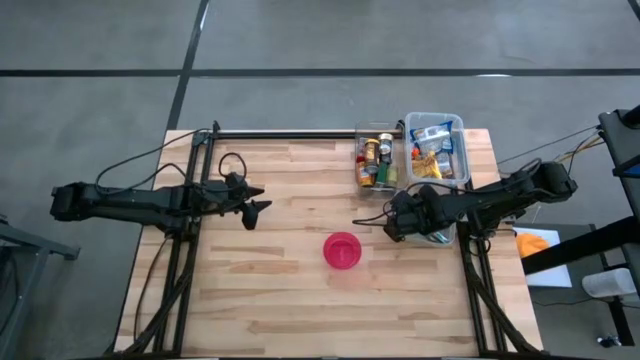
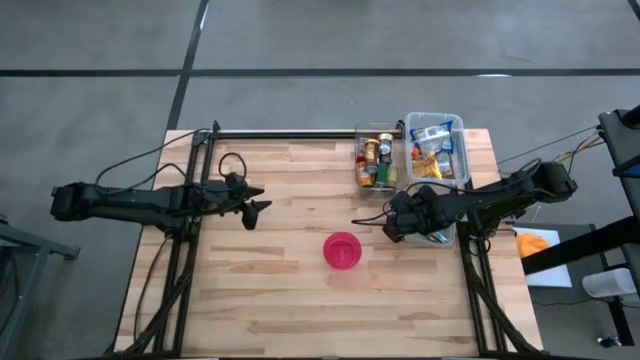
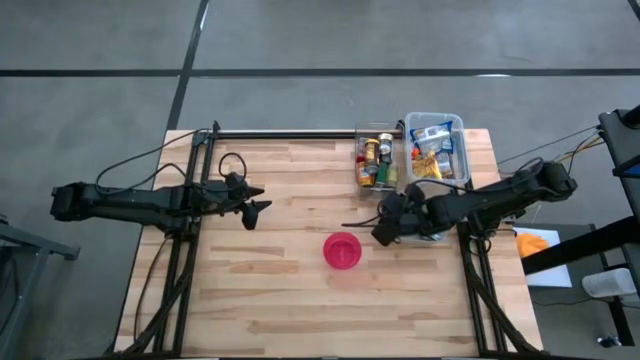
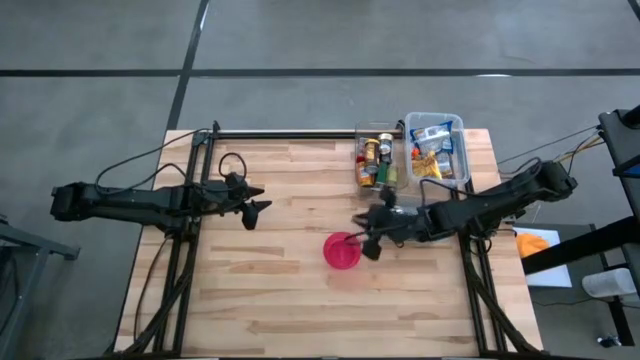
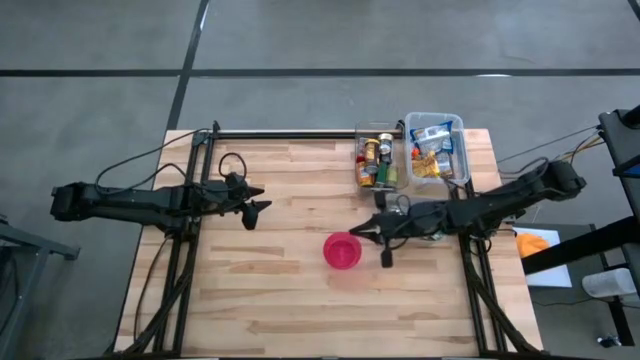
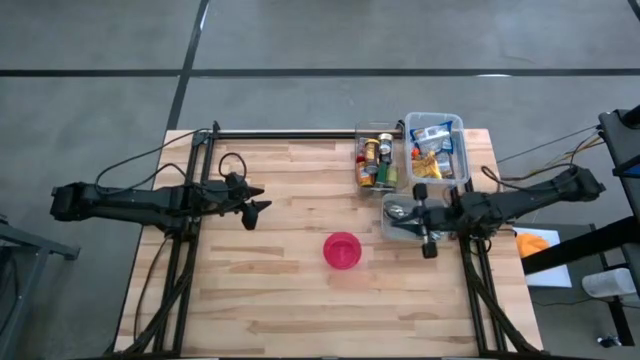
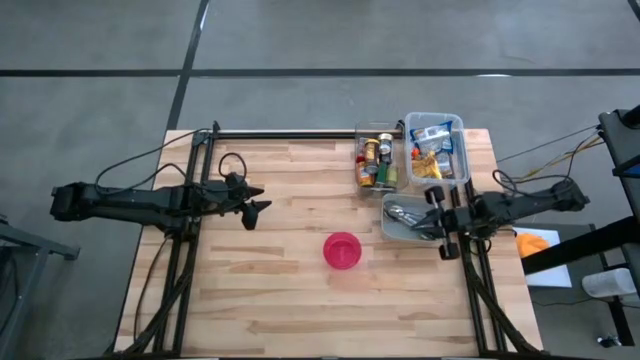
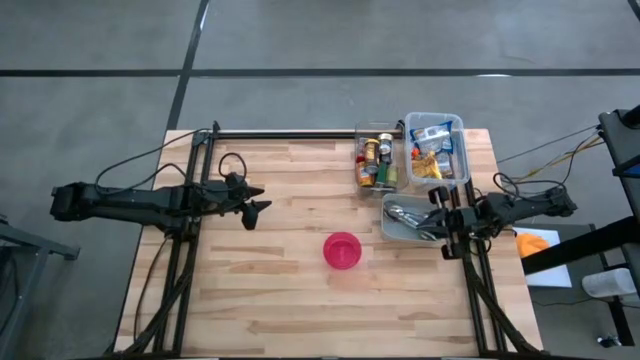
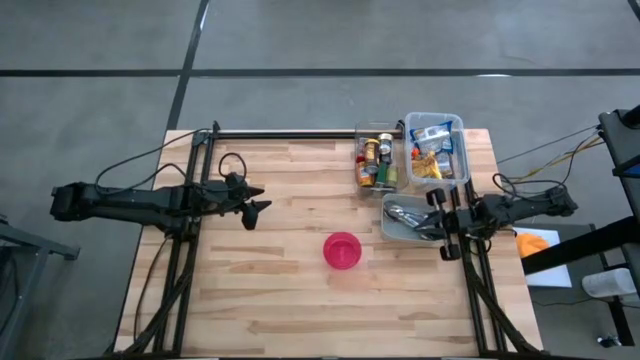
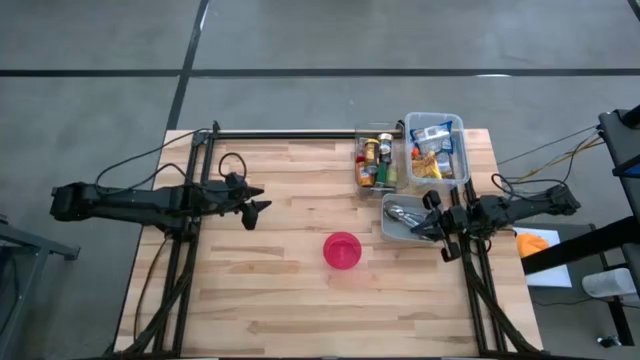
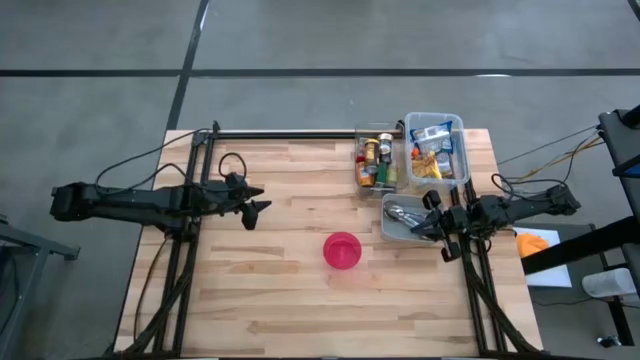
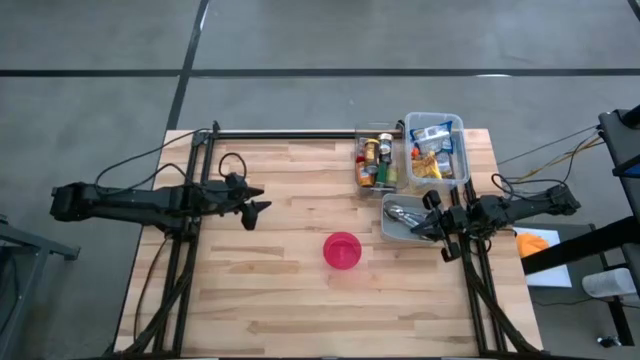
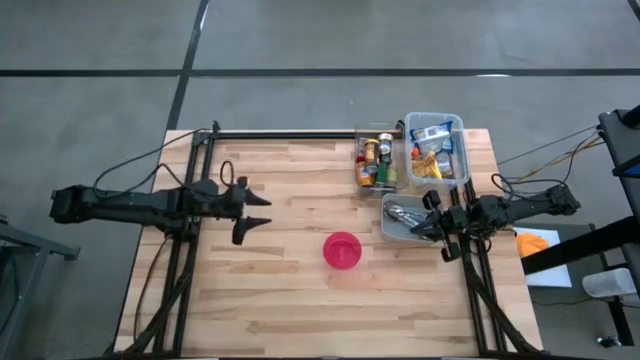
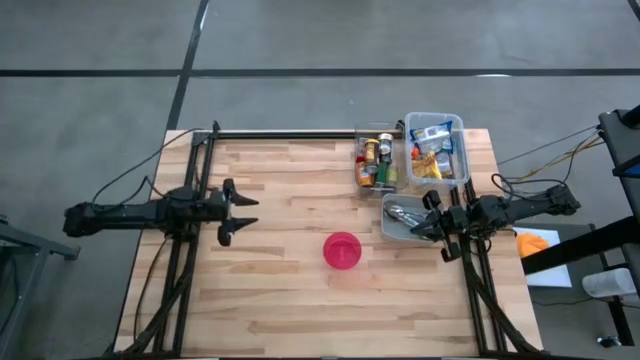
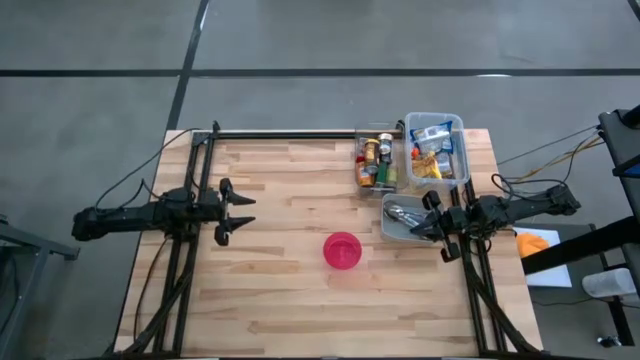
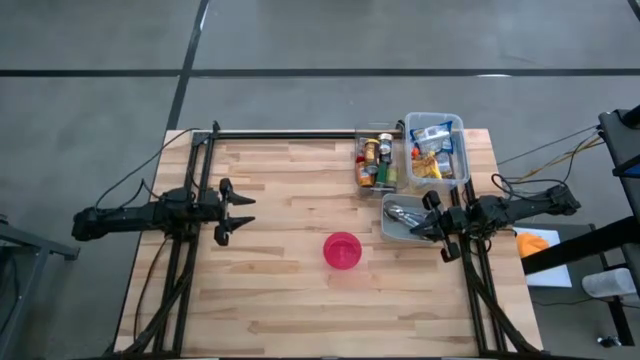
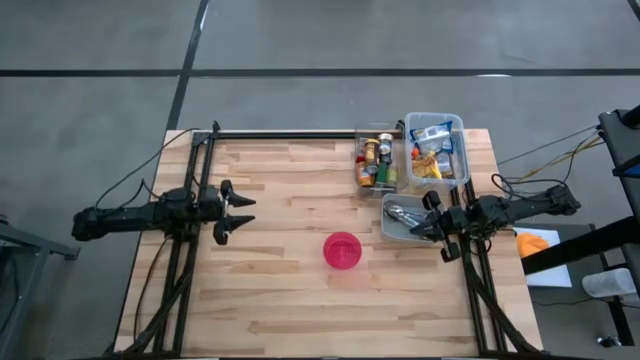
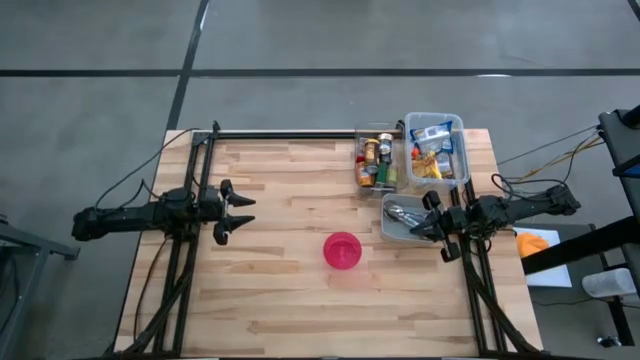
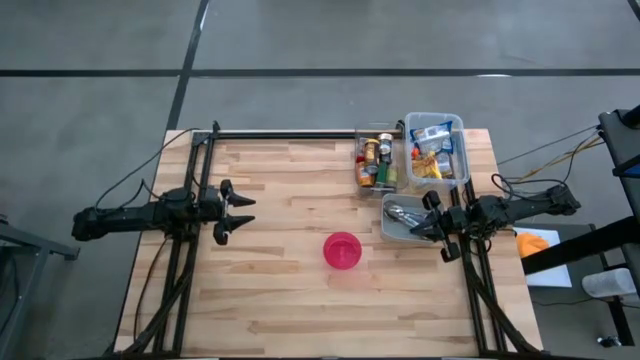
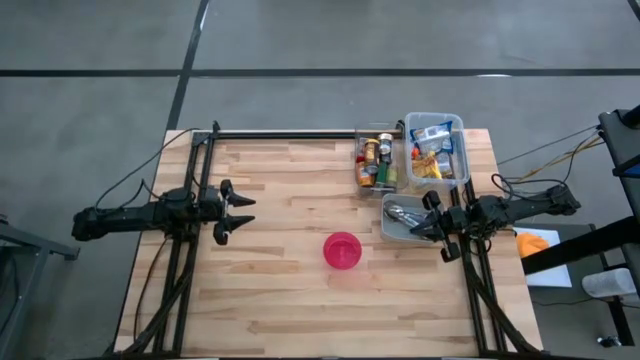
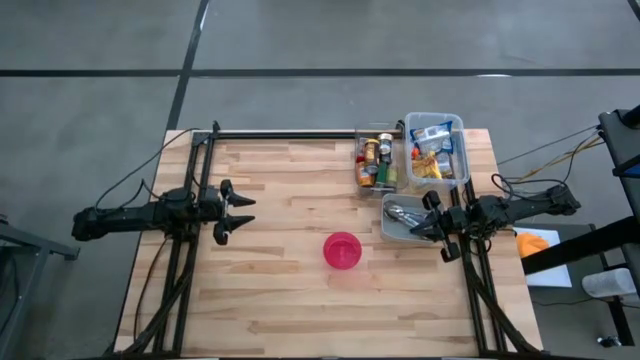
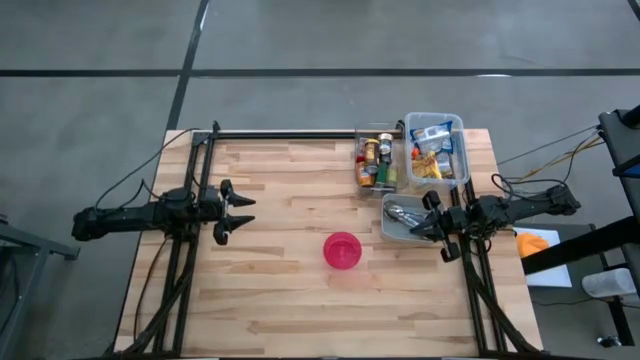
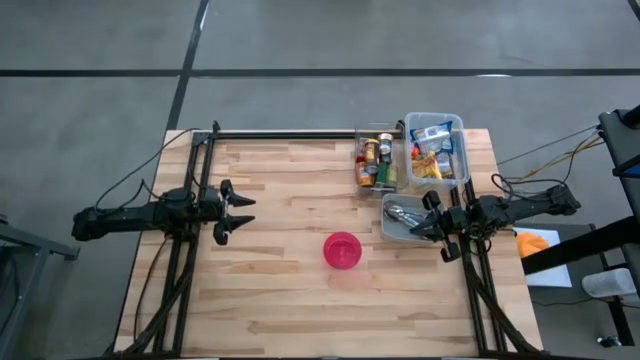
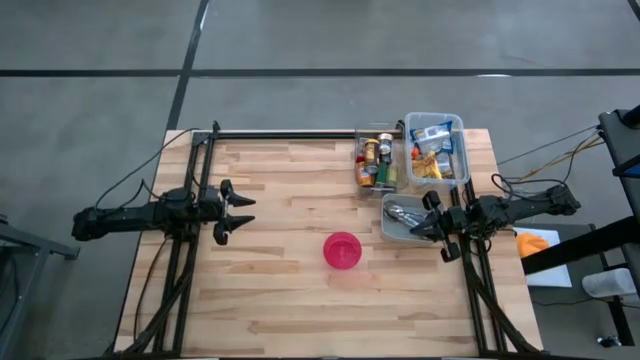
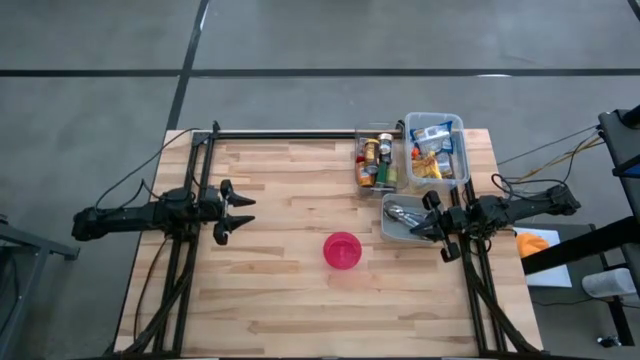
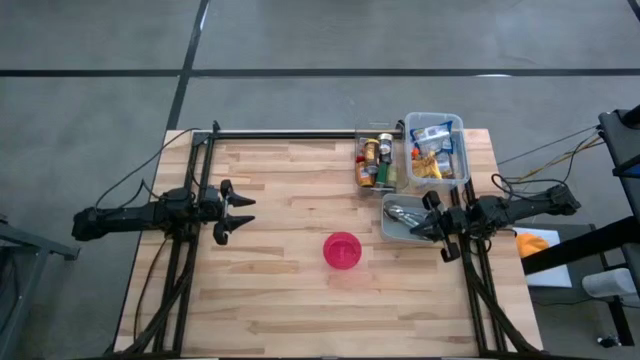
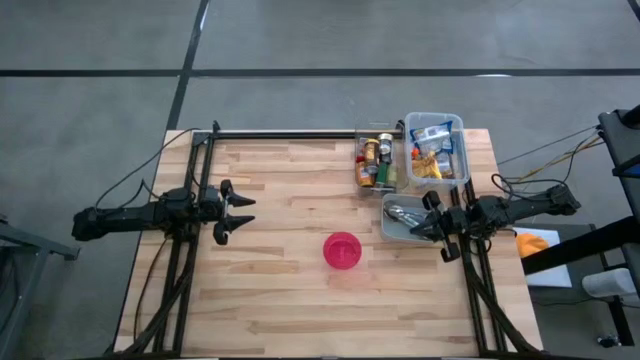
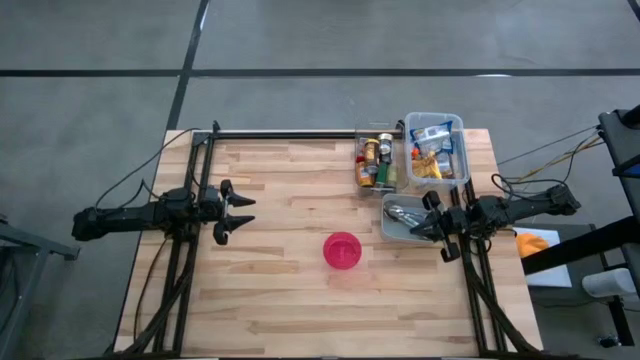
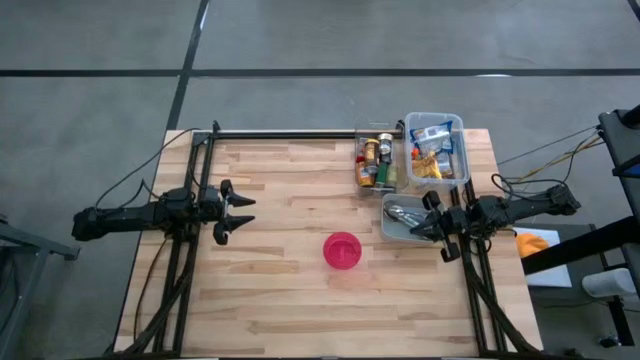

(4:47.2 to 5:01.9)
Return to home position
